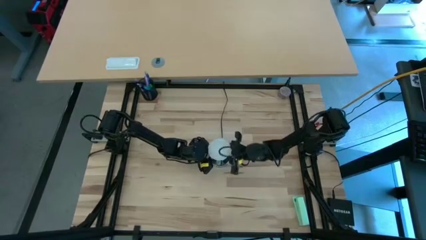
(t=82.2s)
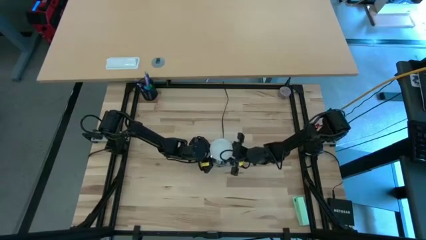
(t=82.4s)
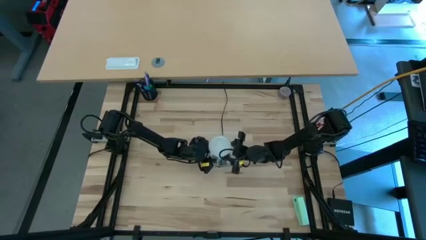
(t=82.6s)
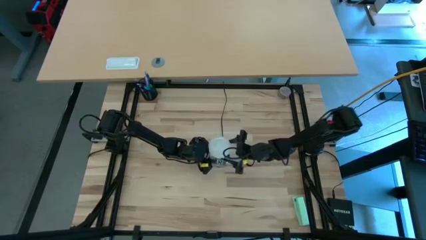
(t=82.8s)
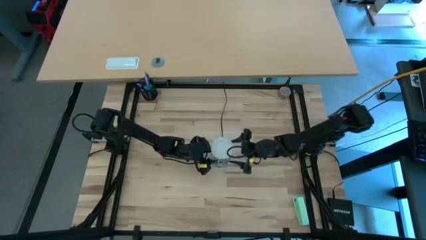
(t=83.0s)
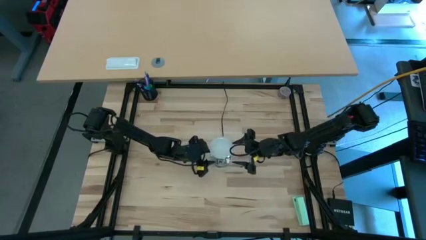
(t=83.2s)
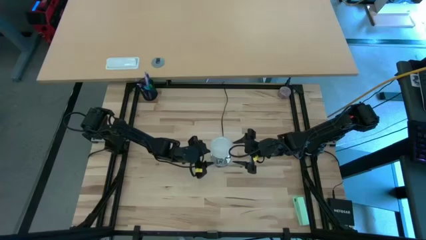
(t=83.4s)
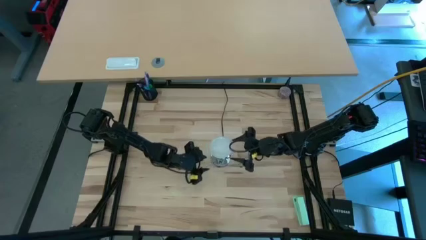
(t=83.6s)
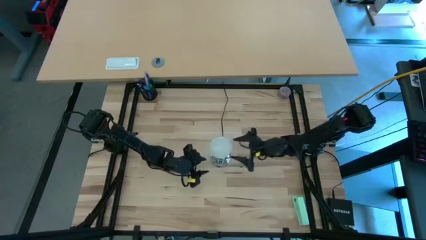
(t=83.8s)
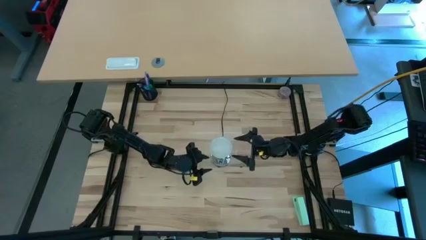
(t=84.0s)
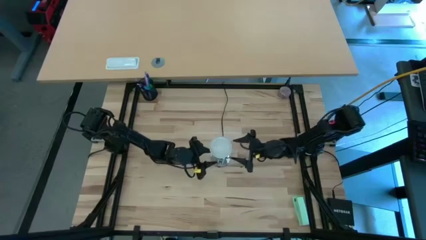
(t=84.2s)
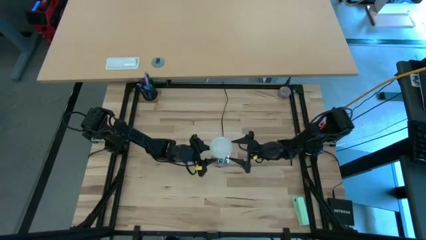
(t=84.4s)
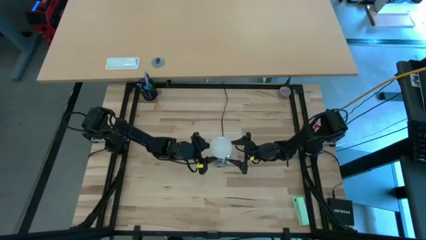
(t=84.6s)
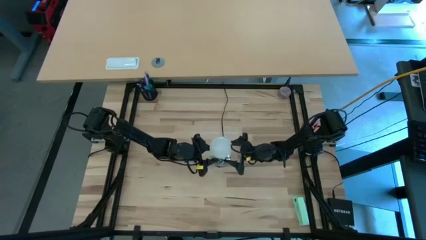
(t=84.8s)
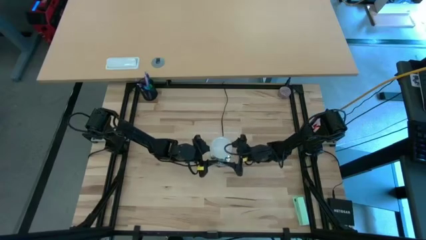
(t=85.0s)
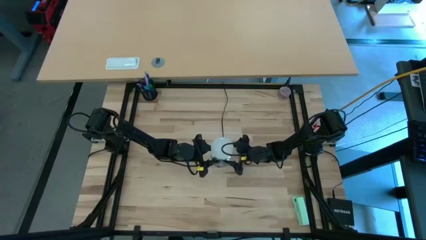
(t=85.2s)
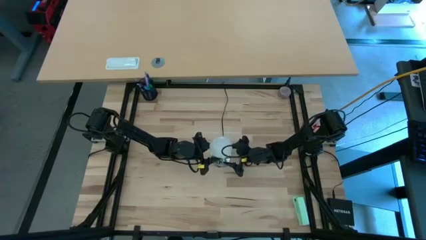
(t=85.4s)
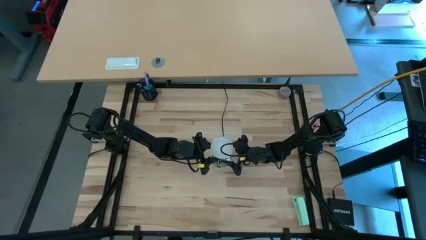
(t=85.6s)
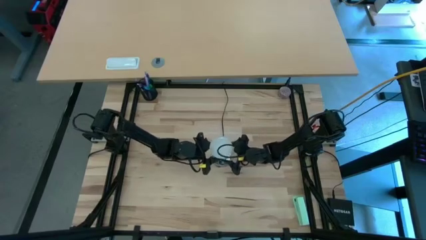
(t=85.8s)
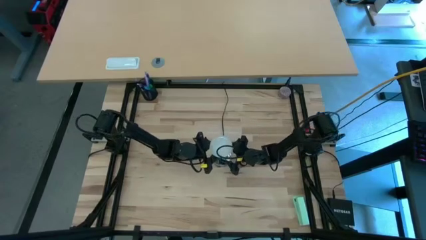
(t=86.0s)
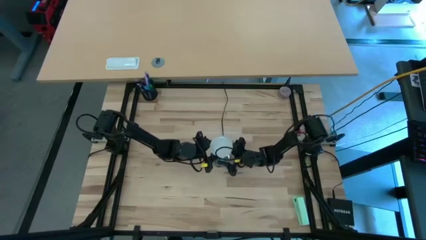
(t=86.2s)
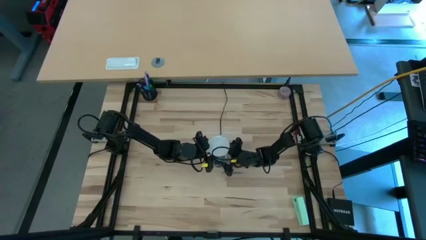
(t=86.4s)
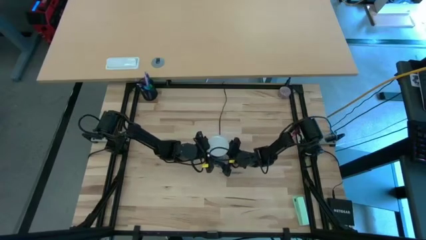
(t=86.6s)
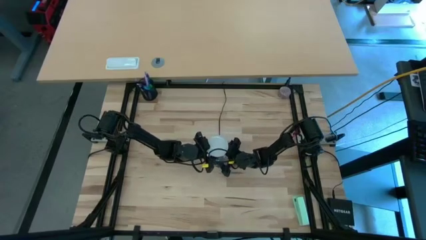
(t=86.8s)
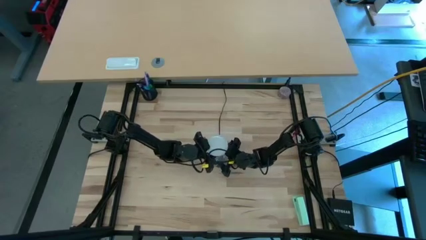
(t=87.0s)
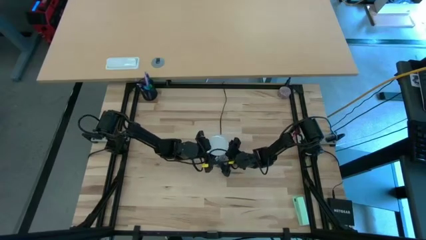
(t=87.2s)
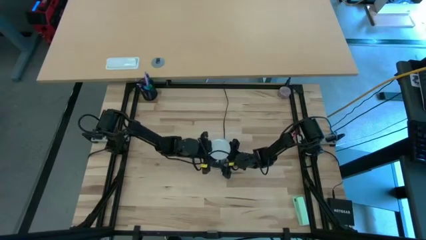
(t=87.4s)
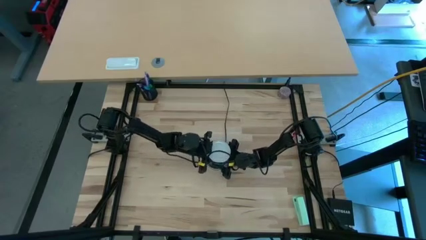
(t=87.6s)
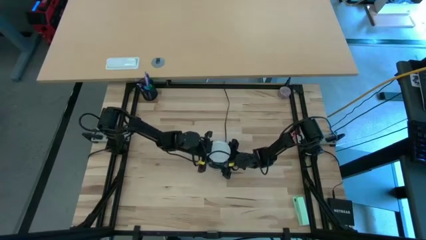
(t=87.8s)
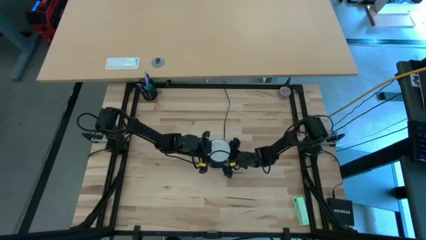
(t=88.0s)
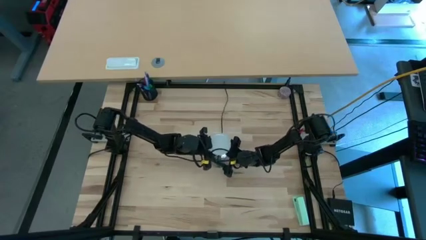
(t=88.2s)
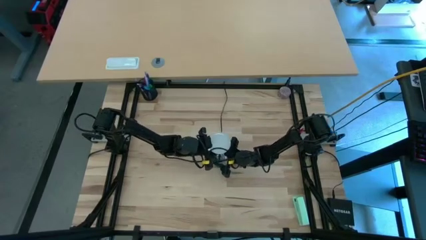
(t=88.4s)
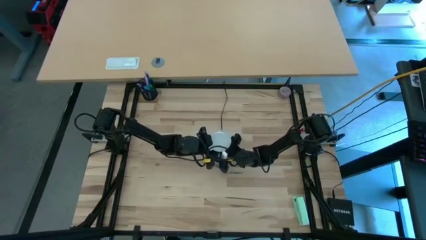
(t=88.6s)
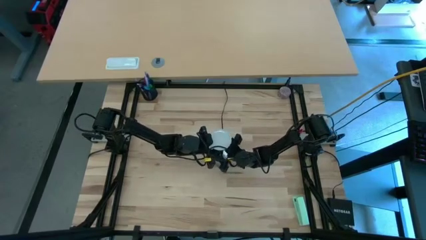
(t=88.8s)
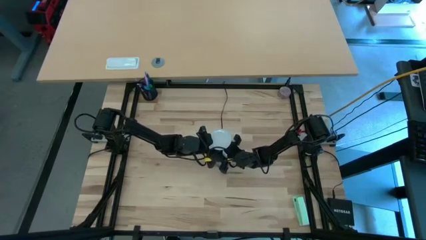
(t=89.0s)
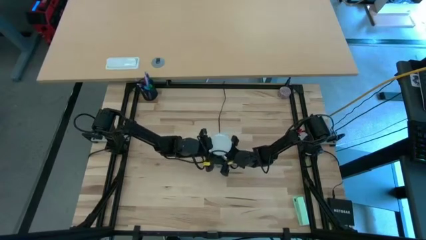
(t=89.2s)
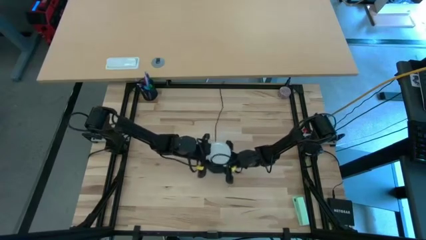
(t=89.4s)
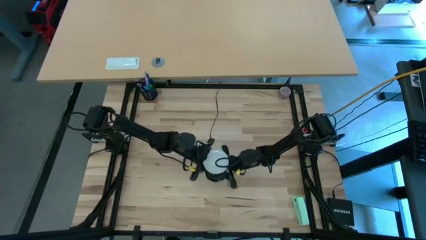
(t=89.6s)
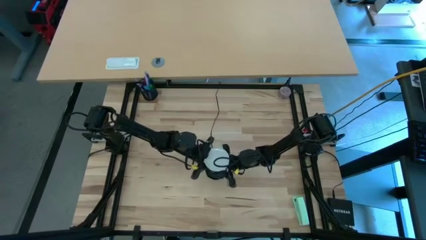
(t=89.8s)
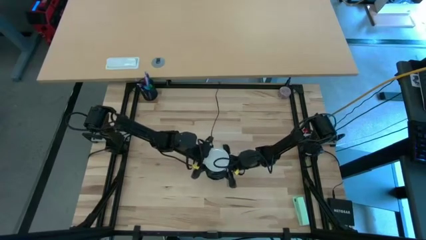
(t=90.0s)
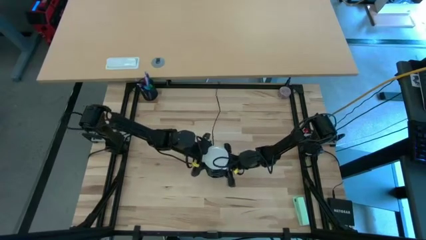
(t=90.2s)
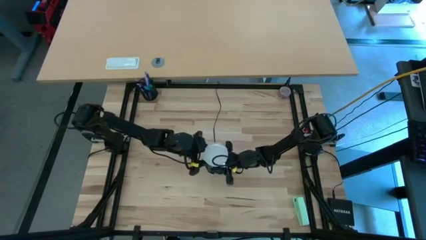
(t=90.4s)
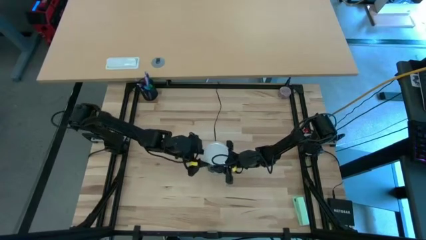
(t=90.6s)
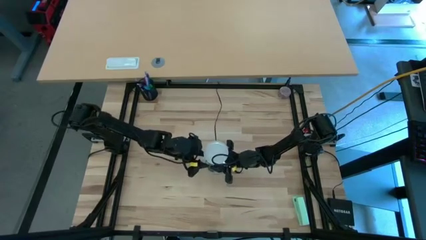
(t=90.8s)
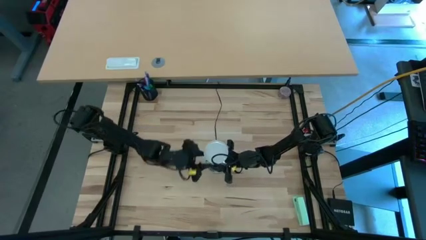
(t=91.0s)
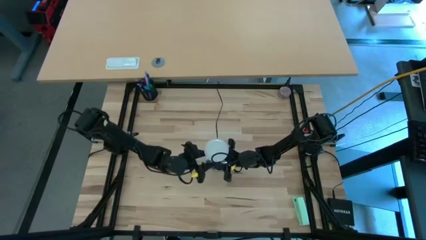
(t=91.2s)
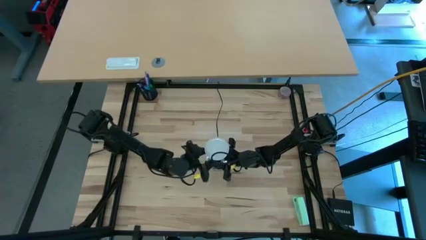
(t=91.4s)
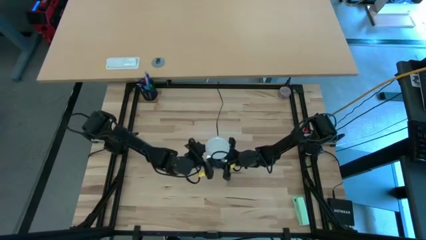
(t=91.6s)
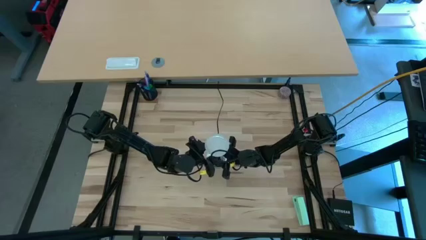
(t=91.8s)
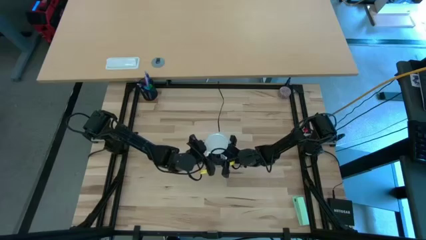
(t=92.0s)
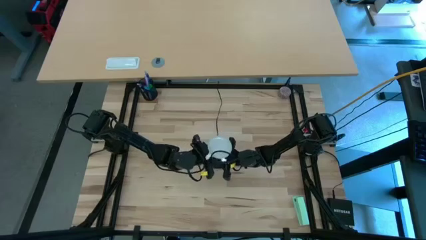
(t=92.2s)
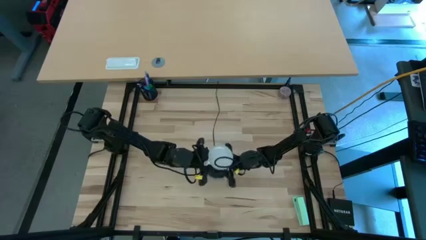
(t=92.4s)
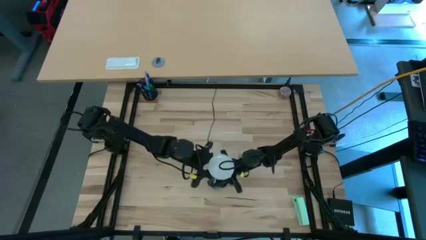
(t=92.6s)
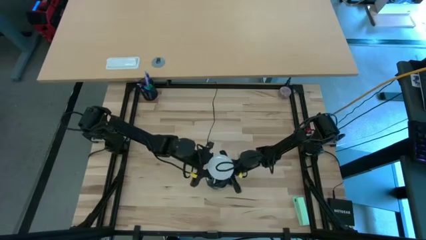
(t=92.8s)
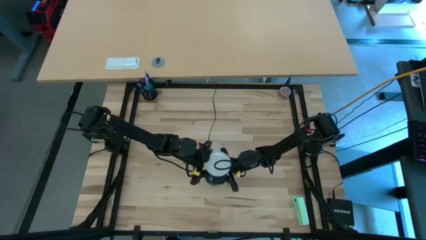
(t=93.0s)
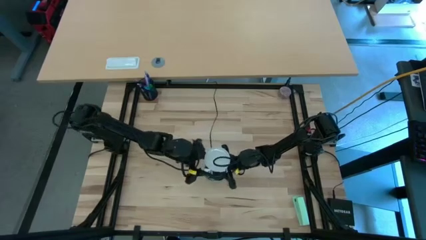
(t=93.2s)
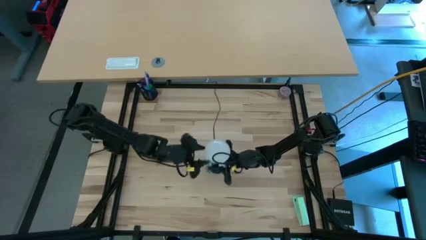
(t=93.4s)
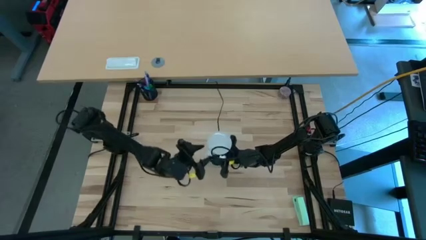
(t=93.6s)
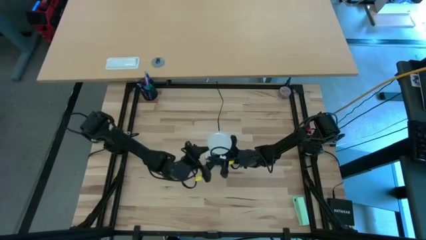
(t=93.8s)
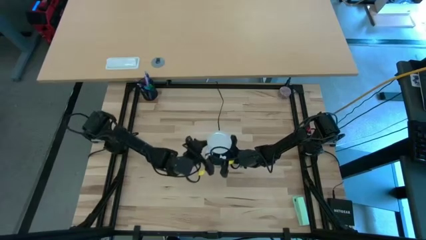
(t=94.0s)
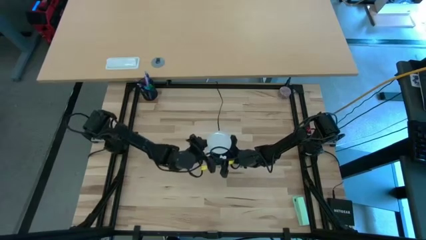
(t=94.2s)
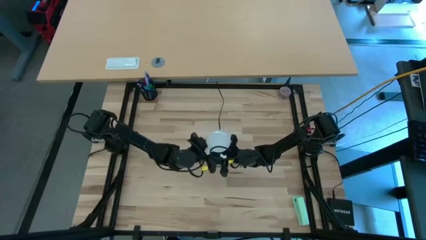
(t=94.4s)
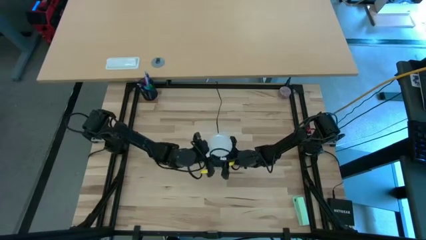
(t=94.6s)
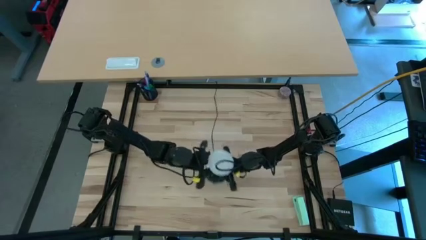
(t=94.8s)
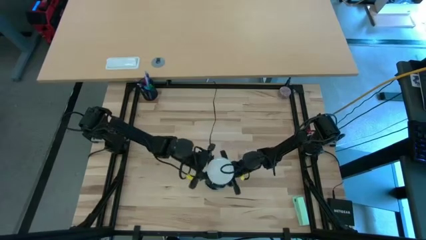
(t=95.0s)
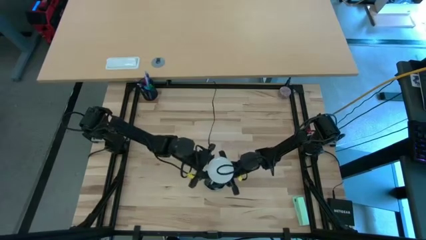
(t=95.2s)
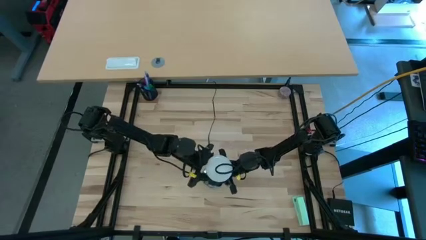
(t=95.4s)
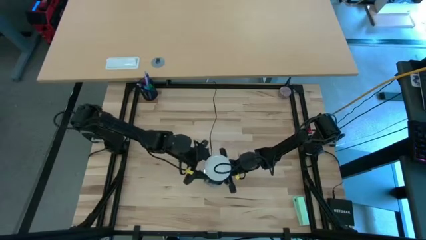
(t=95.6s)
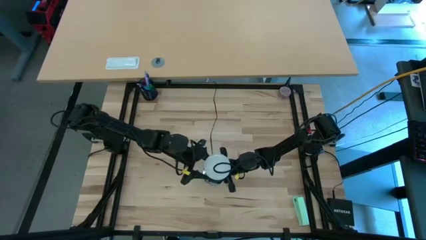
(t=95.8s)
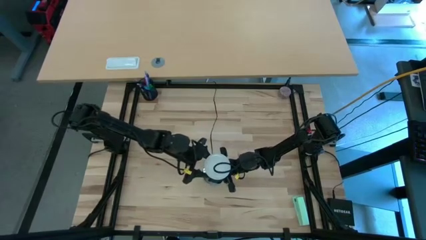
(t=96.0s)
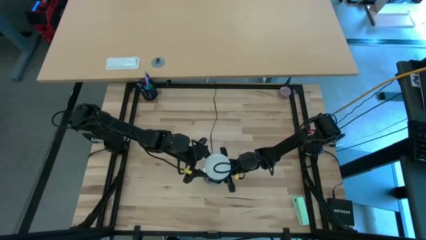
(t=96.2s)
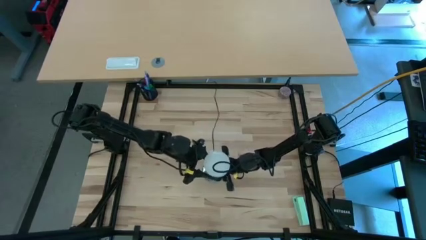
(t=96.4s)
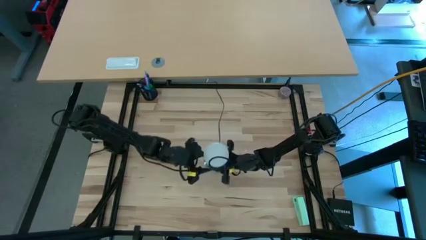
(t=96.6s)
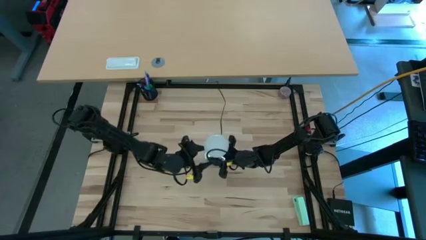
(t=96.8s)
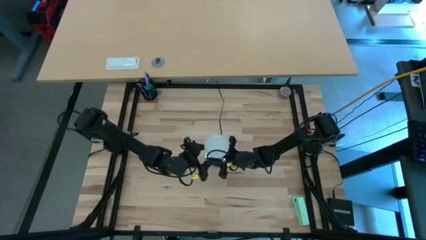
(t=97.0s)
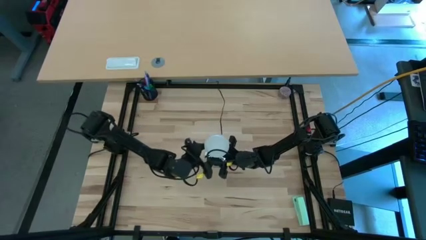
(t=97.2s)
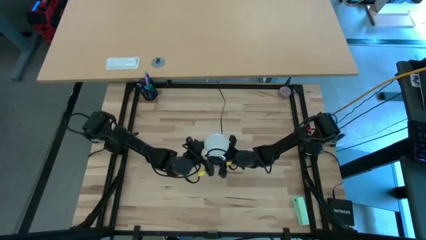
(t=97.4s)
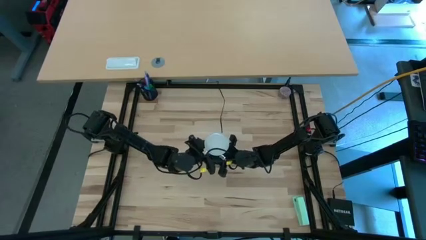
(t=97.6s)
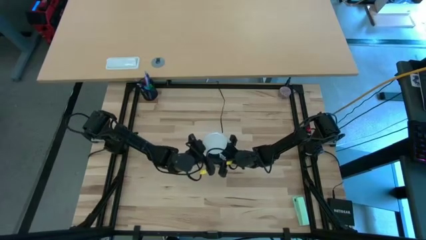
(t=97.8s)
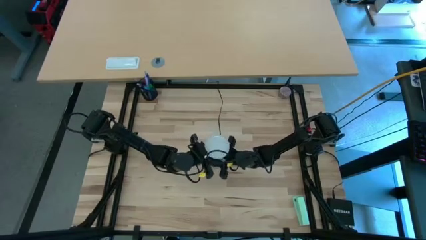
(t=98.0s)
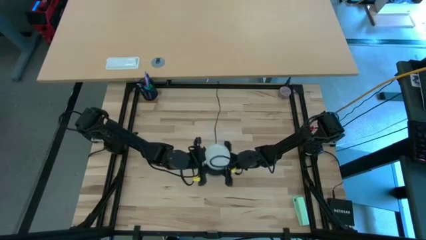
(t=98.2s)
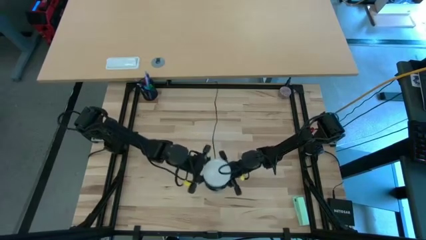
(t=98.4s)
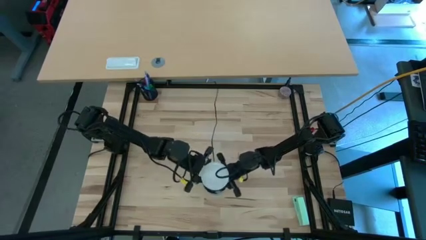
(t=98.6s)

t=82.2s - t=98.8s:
Task: Screw lightbulb
Insert the lightbulb into the lamp
